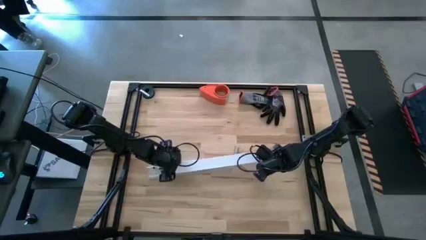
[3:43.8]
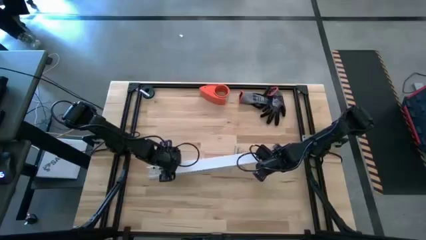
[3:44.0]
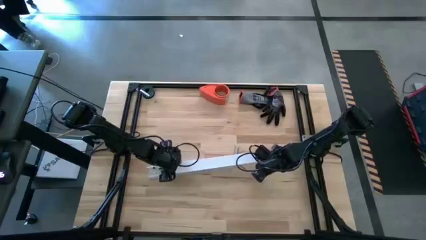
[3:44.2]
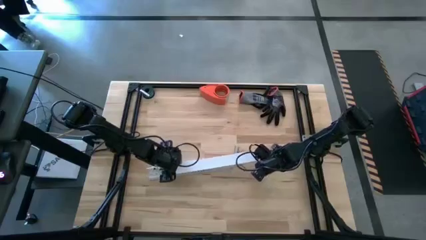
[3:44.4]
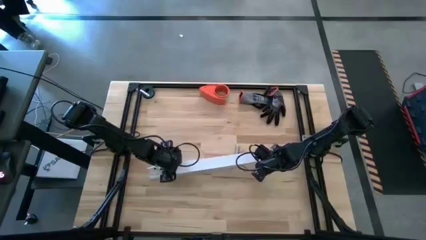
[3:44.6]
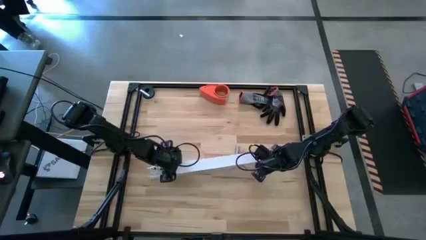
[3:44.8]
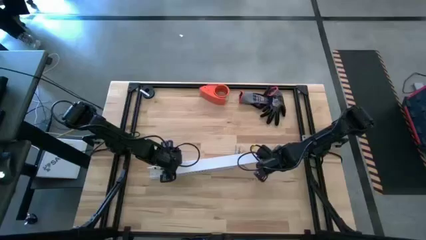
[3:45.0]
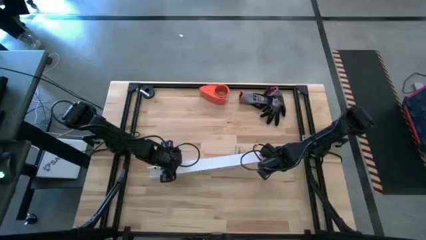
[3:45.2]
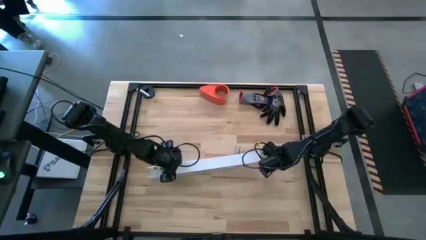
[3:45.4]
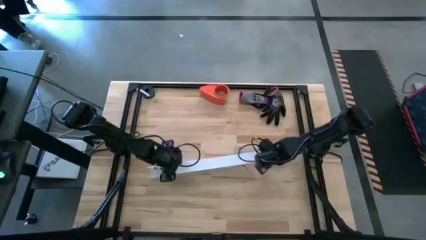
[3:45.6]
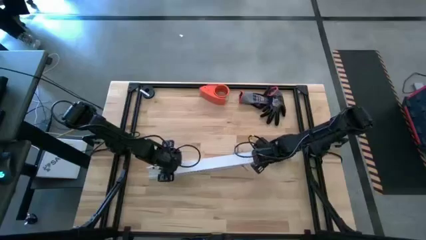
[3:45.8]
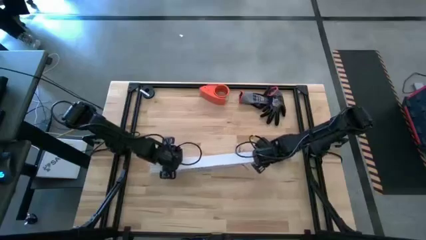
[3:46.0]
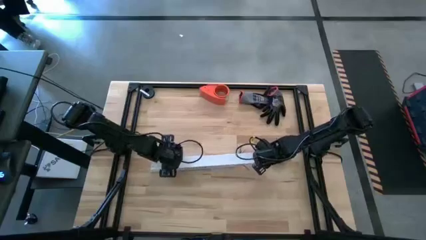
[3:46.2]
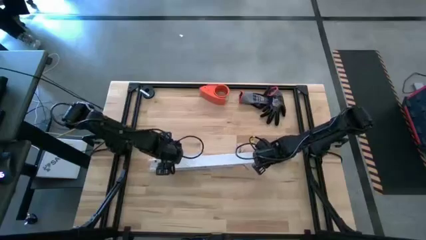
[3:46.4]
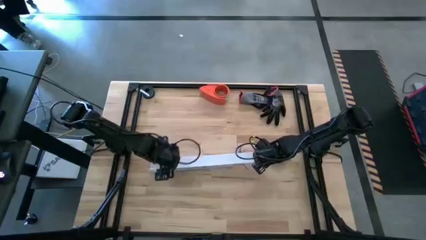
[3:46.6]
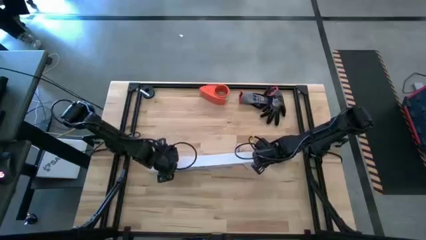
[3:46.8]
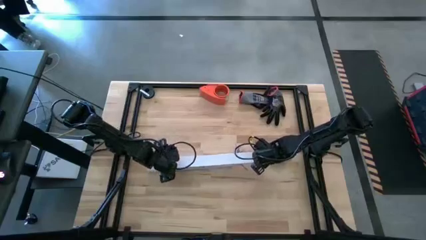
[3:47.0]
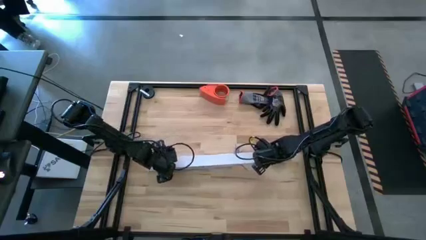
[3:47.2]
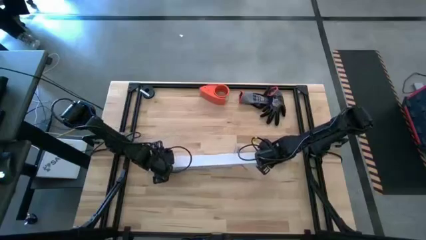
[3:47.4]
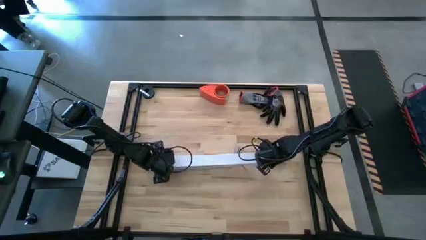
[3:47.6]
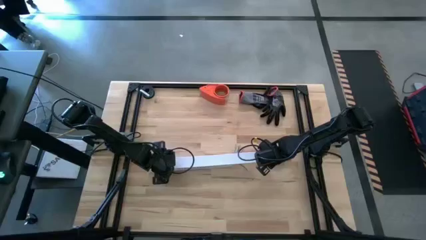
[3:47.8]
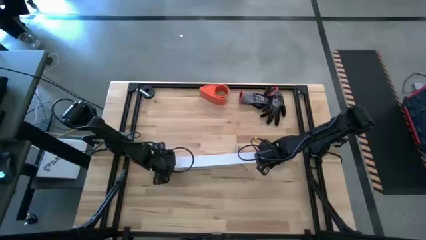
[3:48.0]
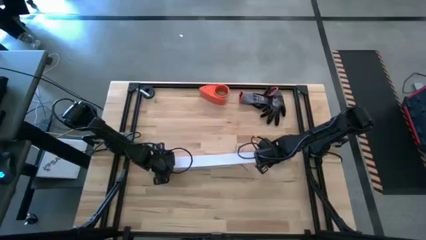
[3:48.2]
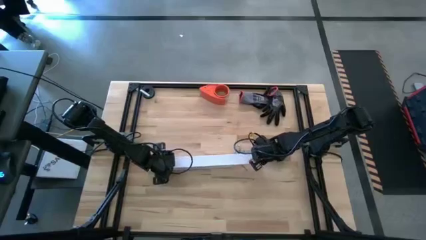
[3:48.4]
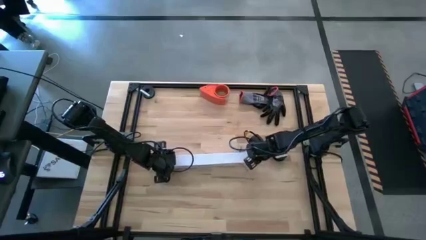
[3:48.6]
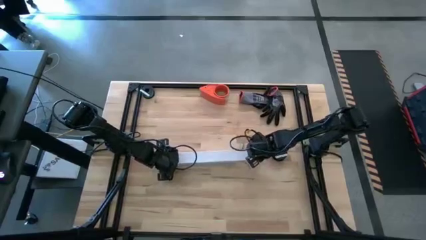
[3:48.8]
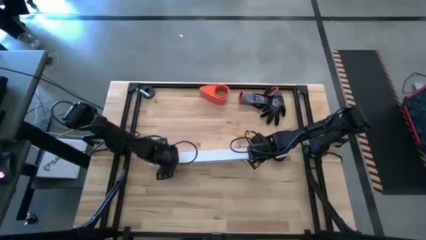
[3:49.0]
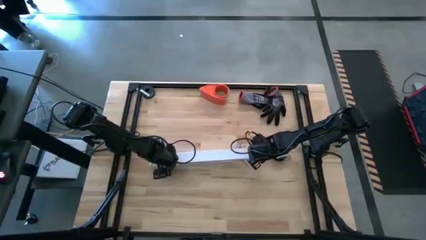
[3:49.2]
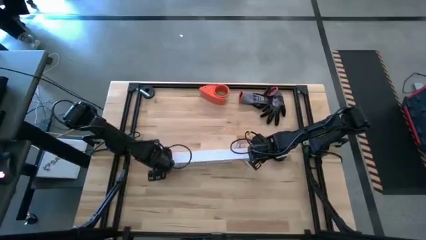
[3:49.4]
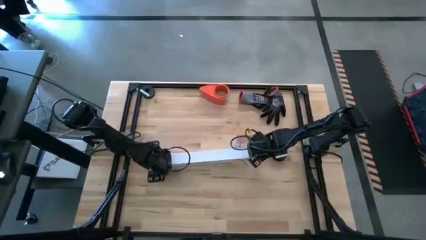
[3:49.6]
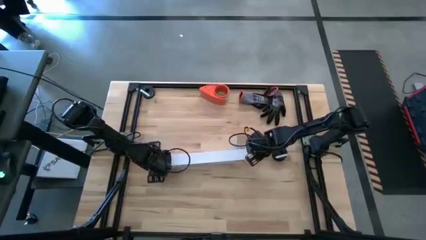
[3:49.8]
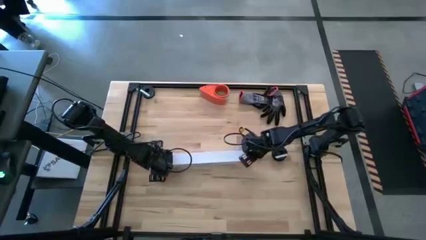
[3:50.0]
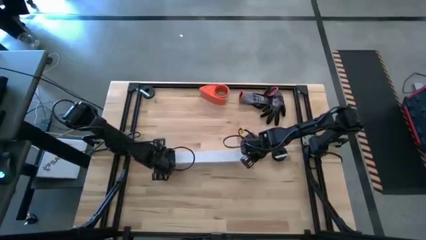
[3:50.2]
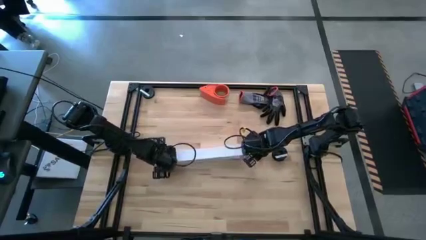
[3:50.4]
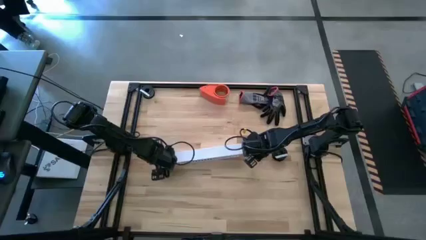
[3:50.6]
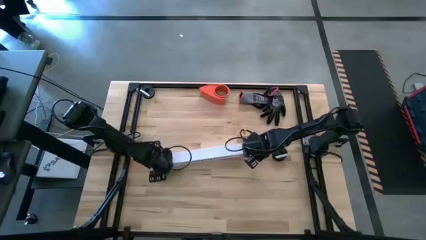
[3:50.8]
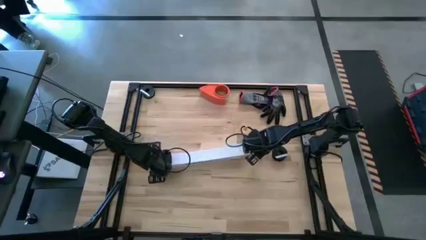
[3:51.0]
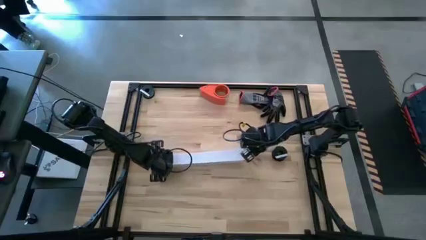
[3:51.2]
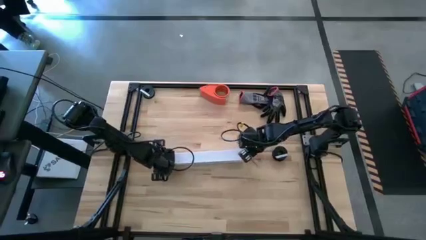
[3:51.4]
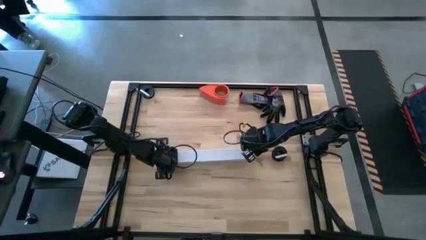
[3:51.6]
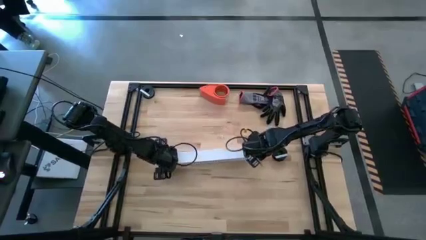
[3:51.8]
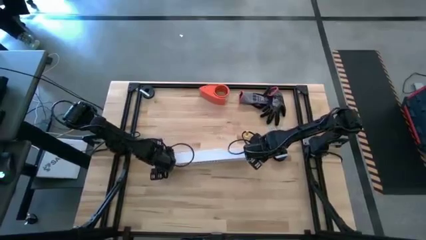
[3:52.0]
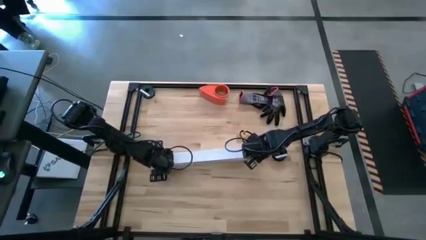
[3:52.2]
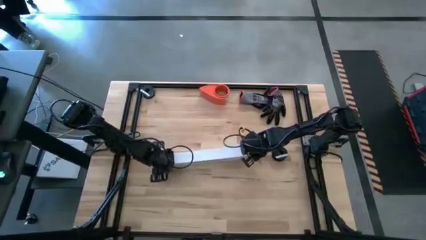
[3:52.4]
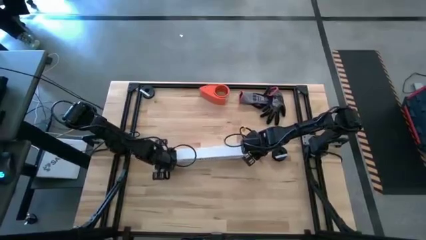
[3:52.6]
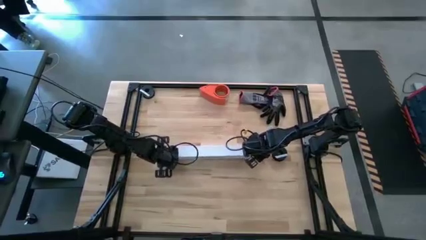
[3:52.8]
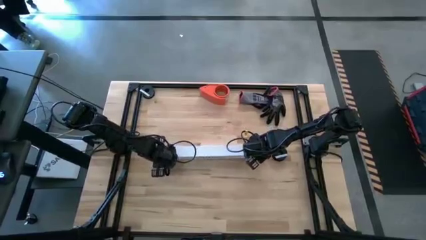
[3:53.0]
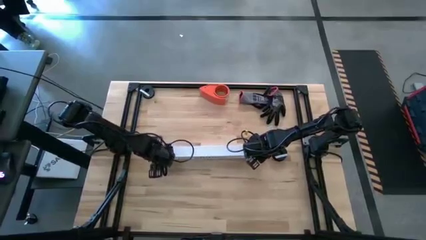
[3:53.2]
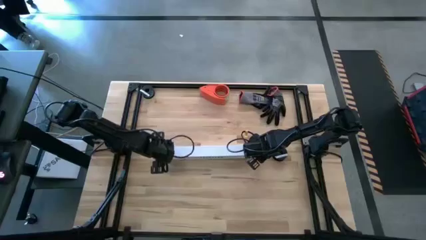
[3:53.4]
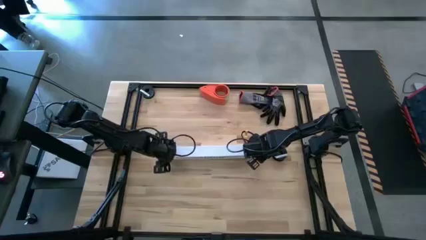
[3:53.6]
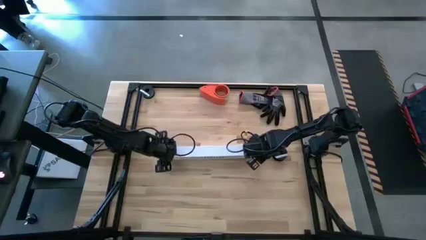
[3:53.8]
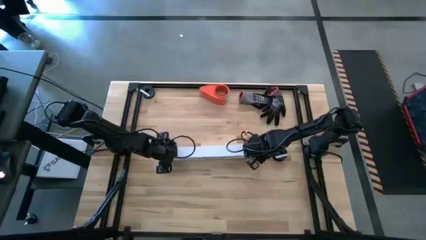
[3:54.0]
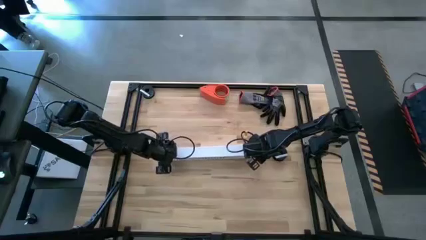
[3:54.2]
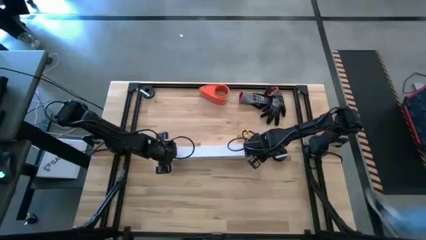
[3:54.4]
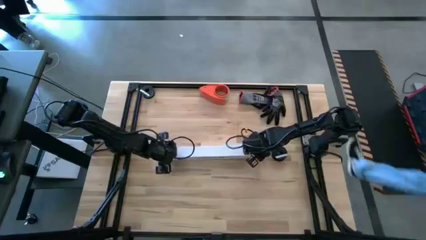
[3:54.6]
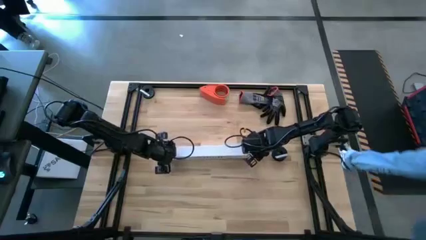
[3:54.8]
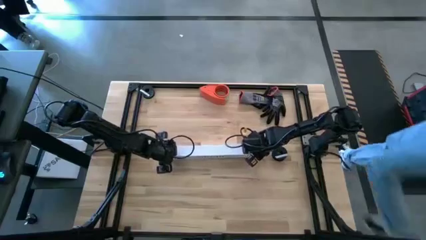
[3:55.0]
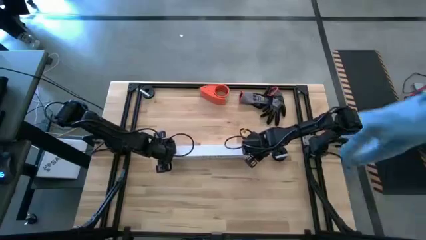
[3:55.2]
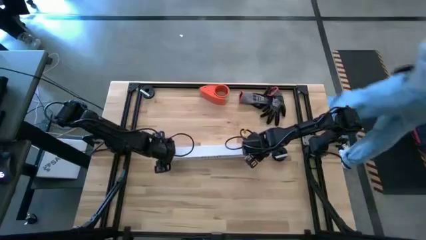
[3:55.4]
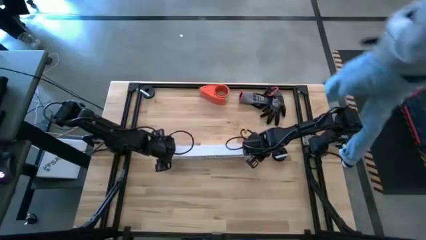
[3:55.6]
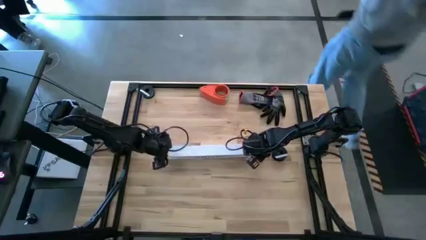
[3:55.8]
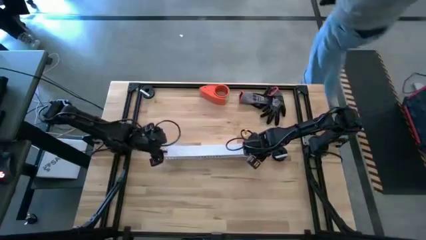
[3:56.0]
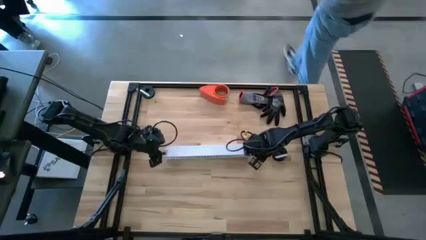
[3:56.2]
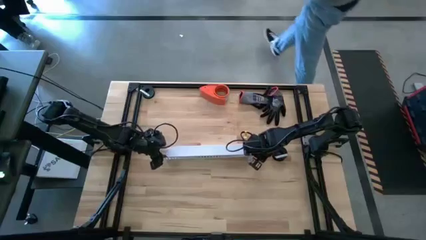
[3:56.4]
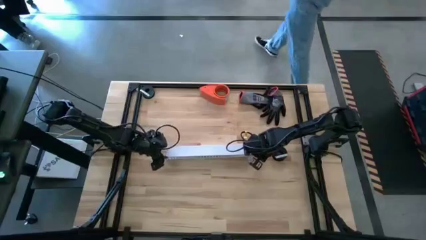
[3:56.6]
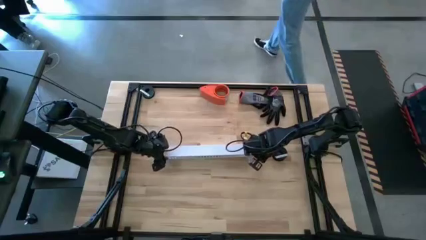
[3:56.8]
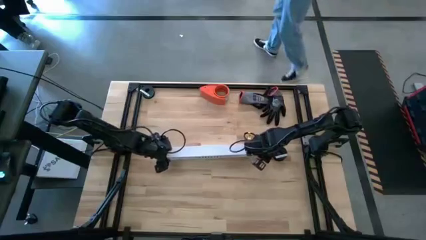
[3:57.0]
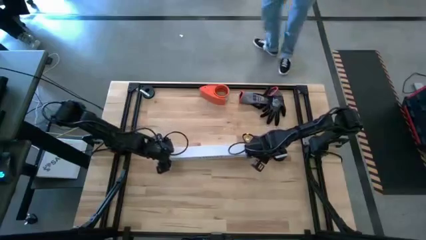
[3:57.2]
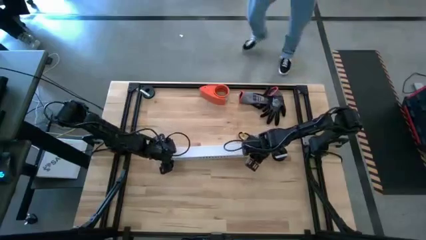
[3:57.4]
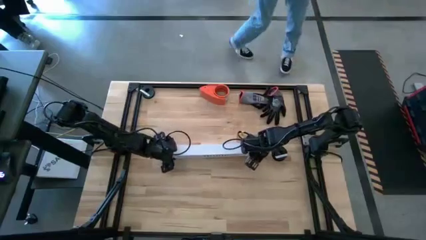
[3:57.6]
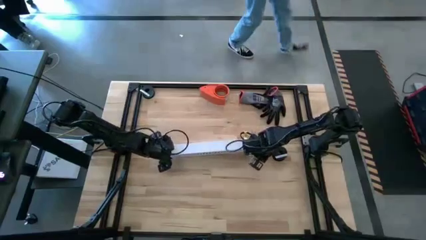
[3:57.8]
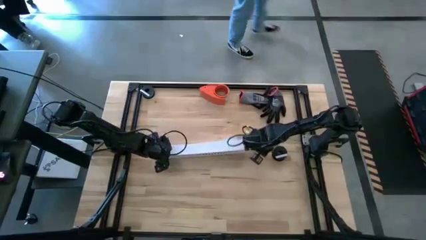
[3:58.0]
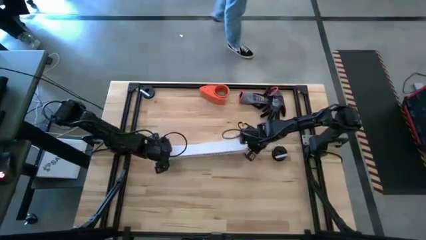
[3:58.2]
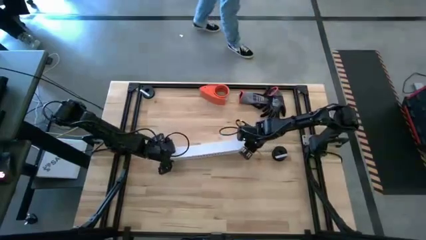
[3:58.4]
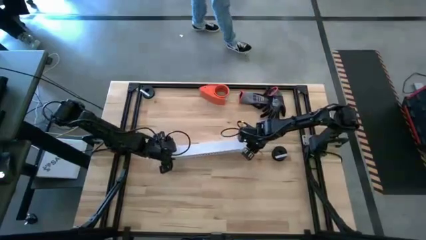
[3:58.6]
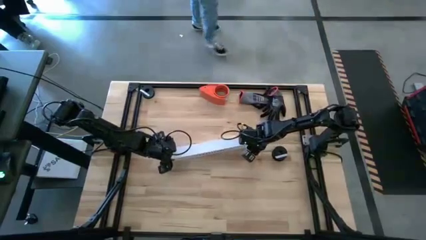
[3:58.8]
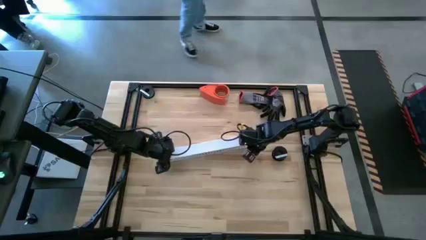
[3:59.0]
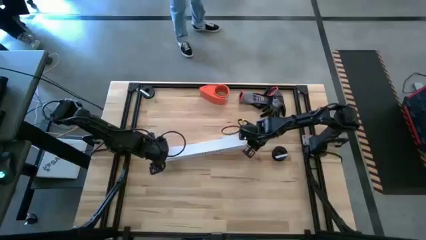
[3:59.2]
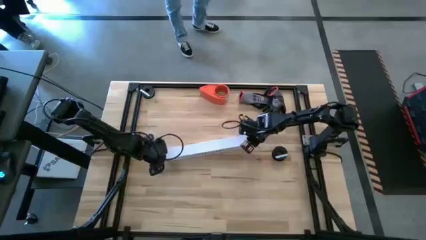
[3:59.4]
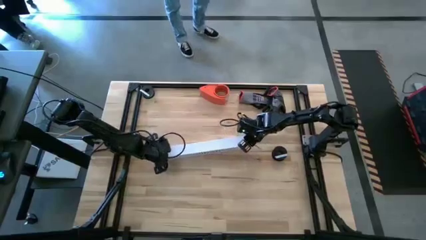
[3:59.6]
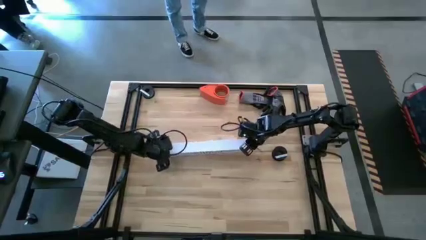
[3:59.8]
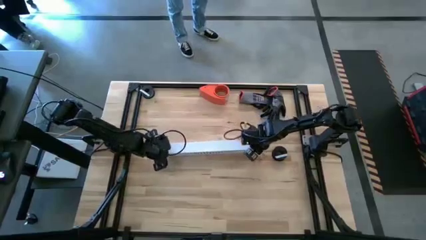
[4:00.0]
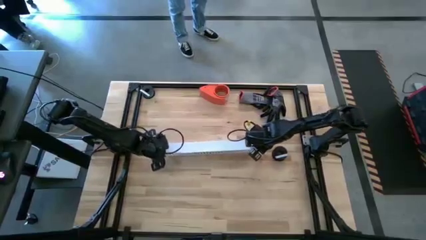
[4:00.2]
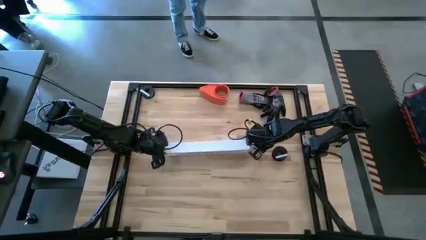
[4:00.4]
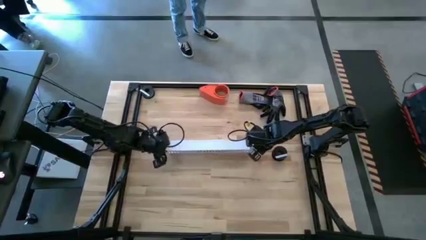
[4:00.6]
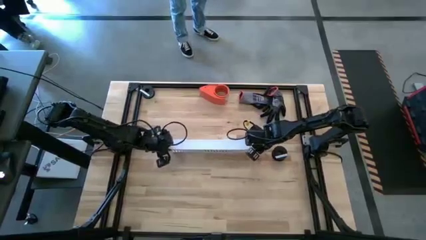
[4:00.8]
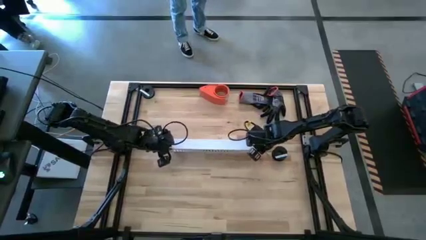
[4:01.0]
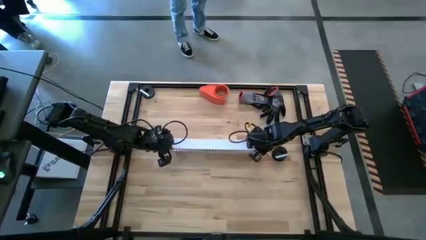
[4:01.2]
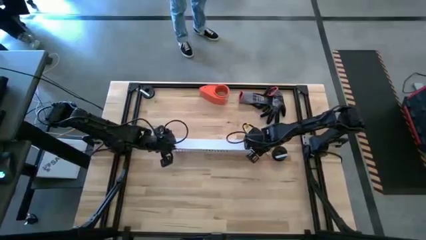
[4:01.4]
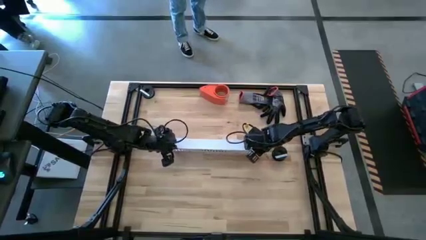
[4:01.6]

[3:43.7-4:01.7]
Task: Ziptie cables
Close the white cable duct
